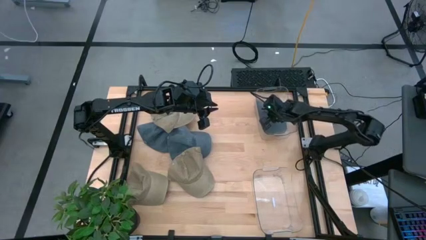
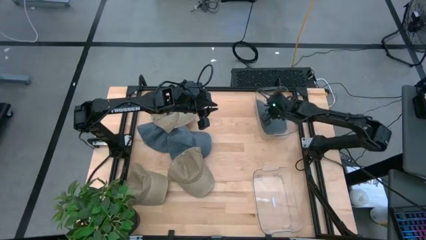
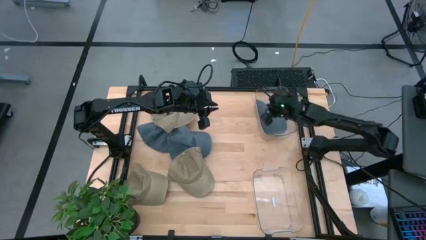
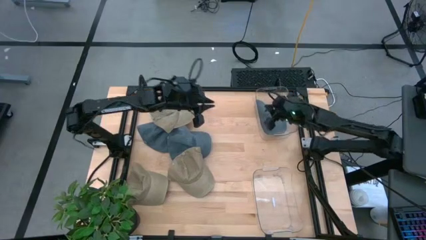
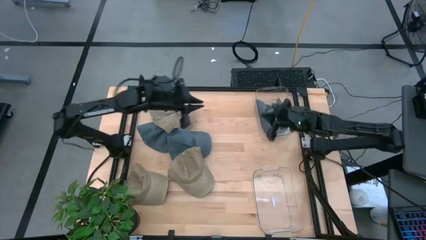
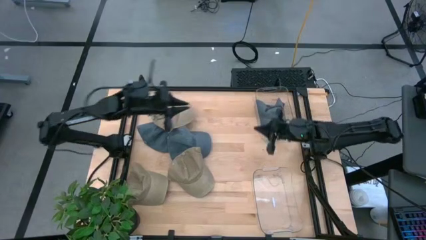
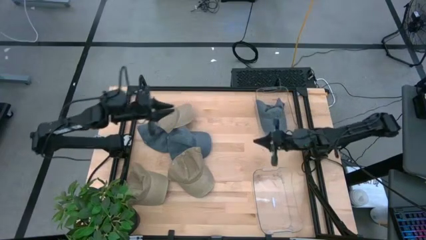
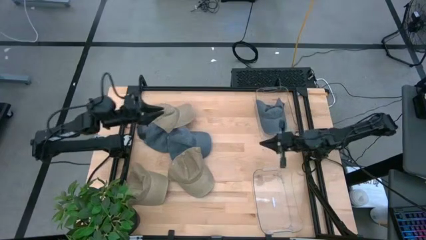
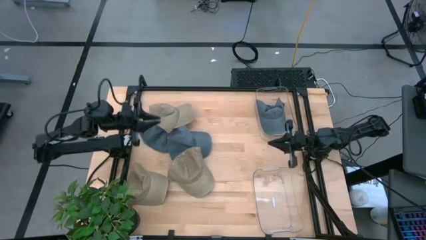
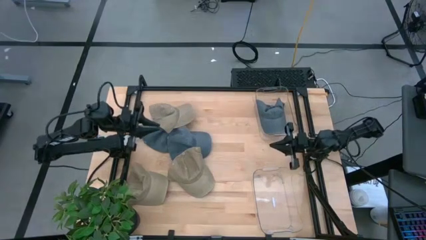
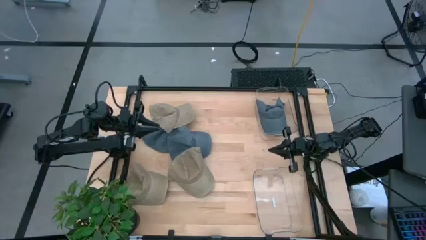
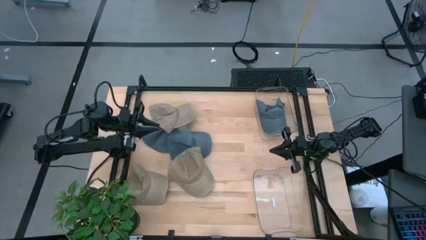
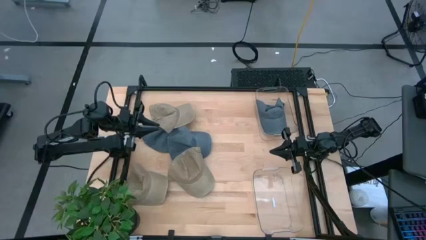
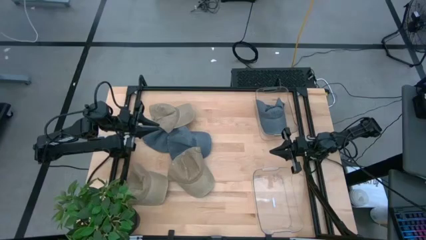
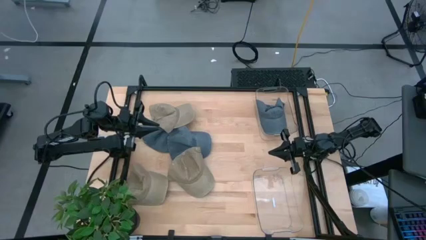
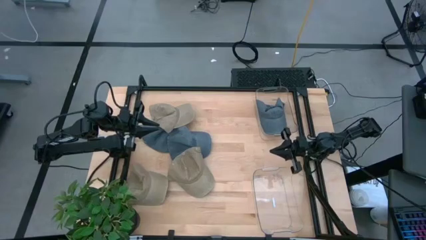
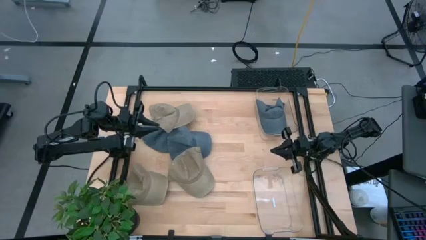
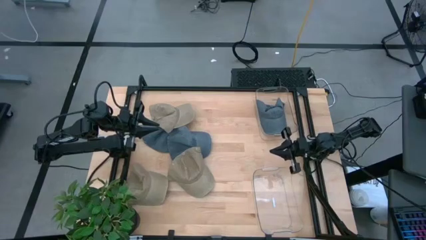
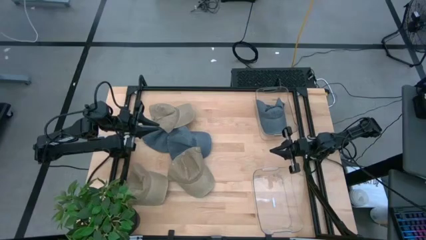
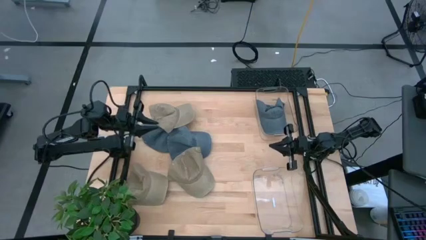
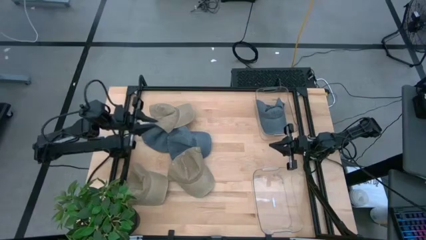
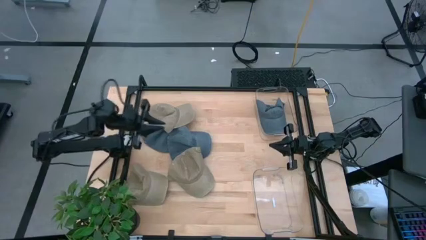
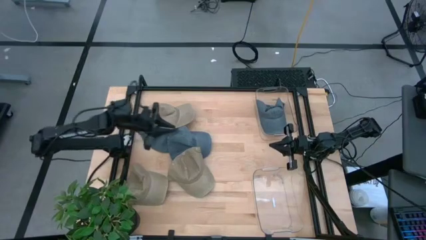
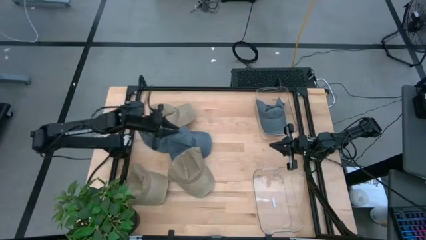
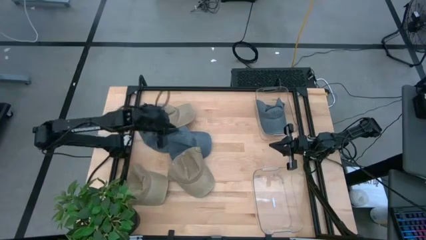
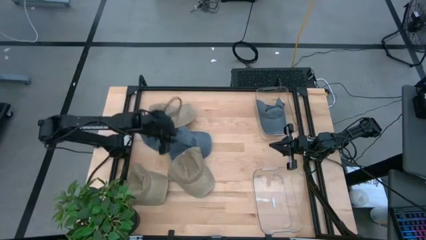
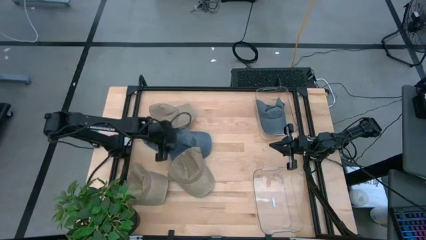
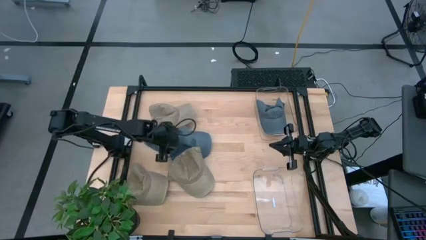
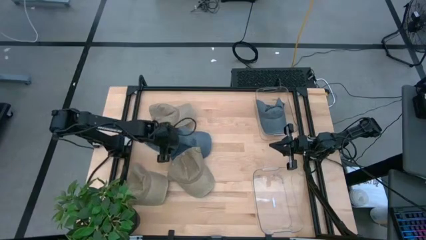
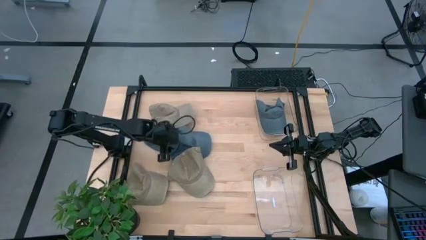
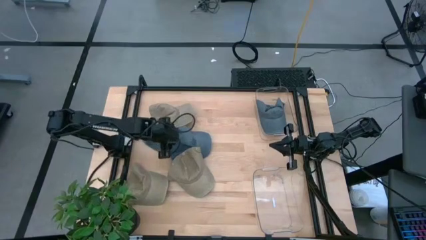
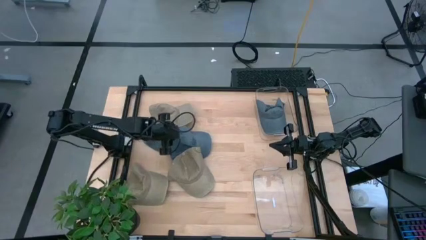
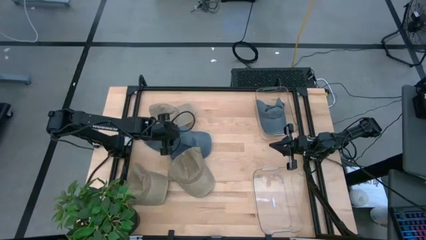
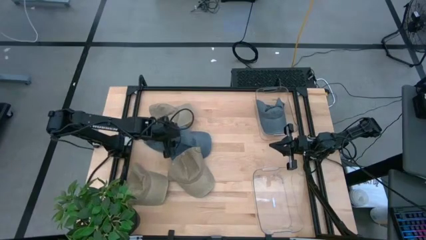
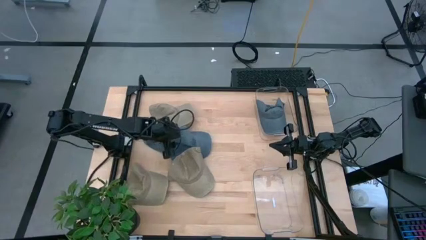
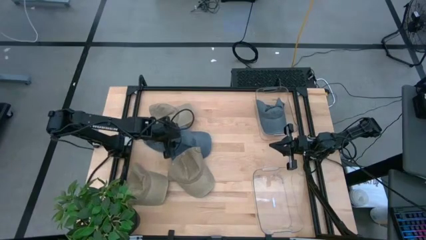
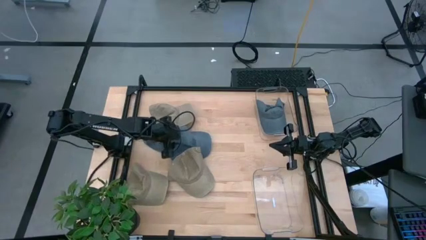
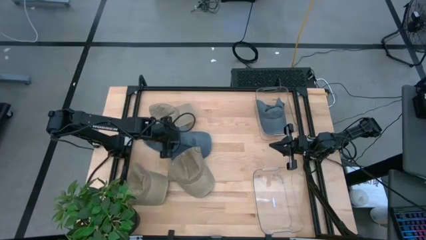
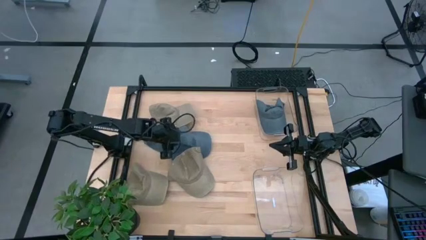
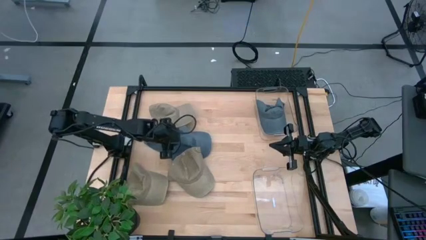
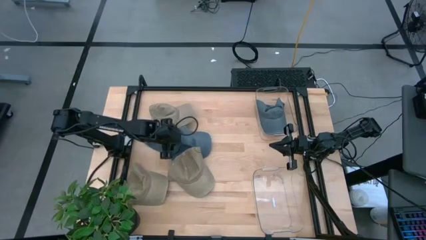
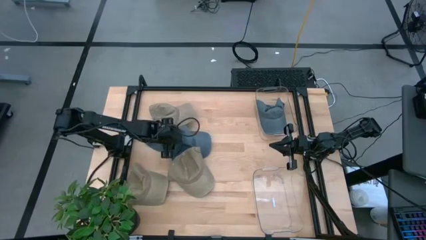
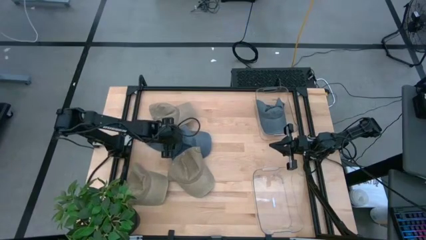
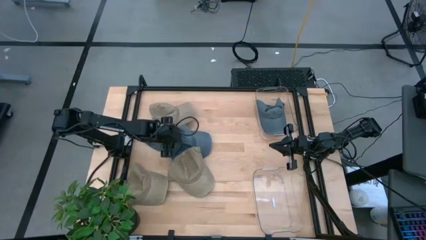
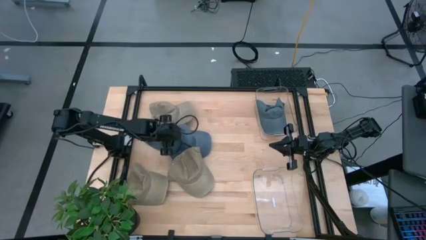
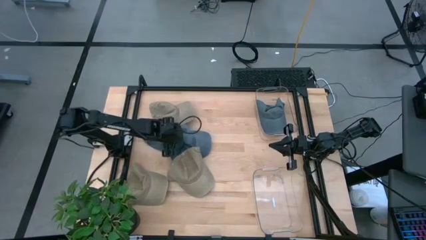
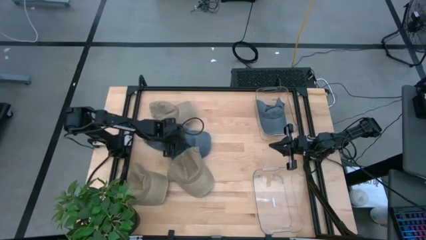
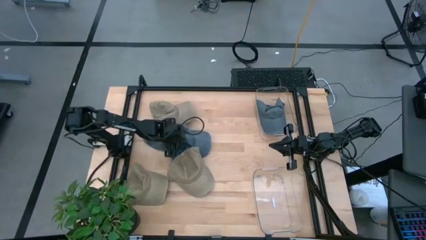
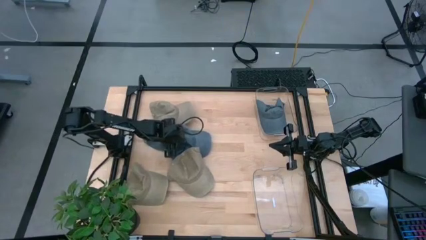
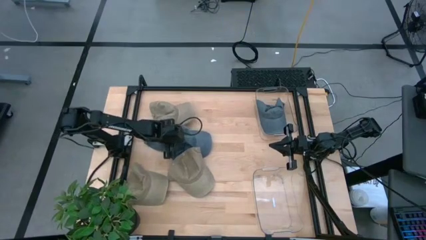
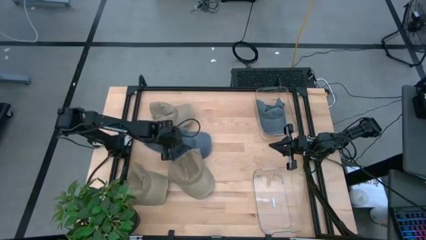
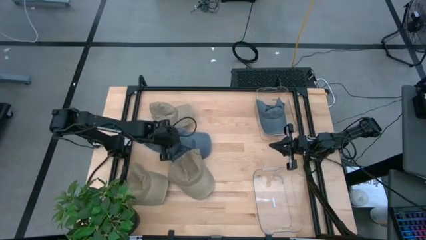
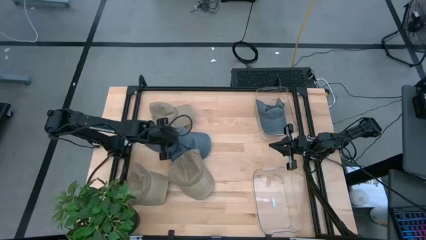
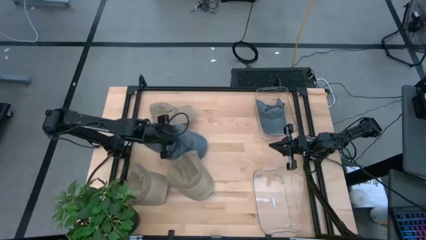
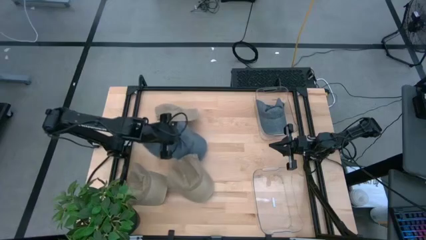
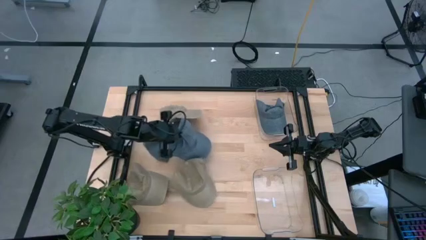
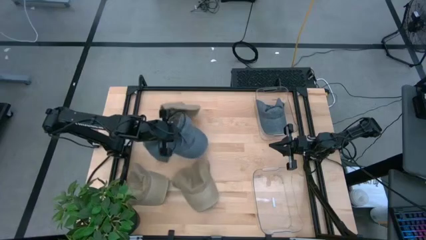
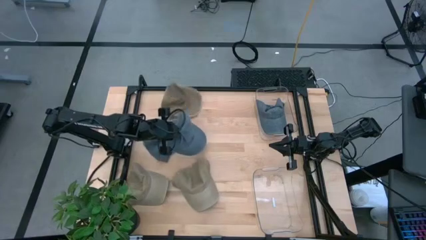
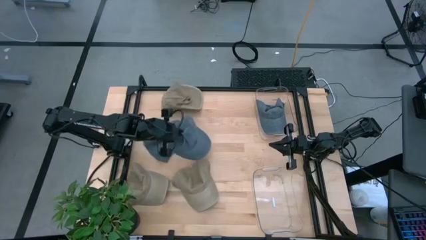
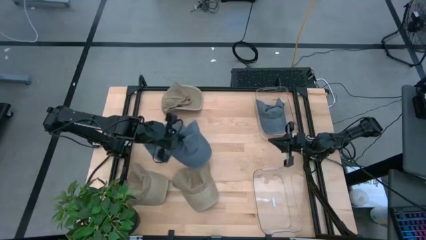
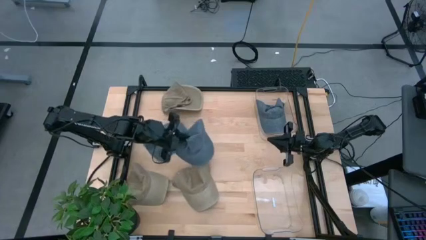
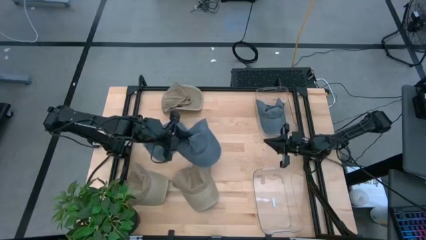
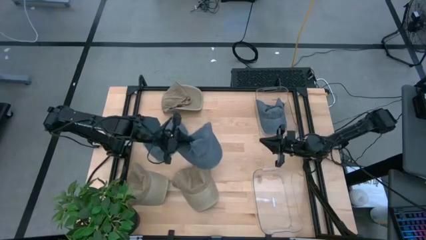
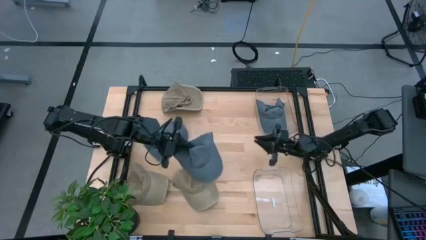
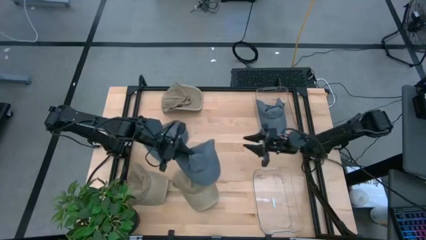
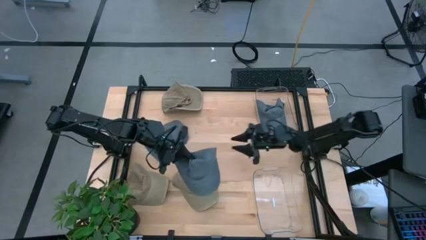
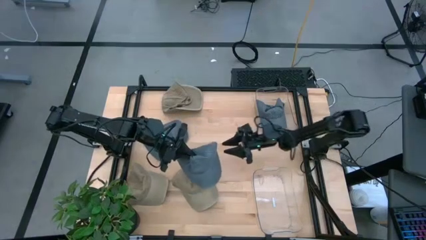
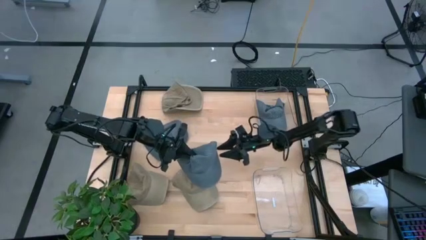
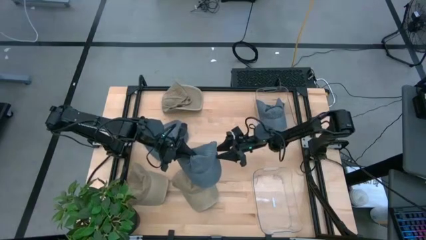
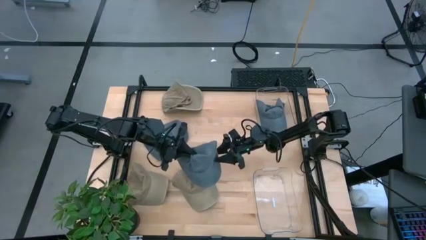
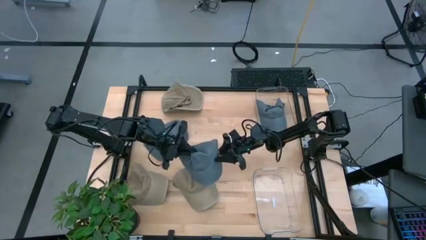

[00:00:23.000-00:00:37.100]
Task: Pick & Place hat
Put the right blue cap into the top transparent bin

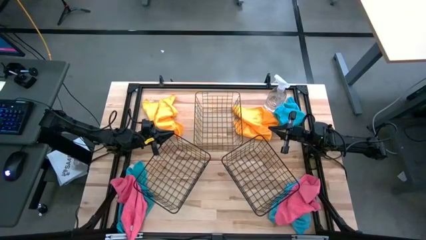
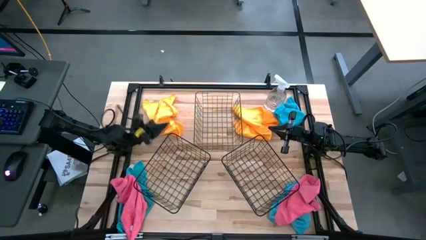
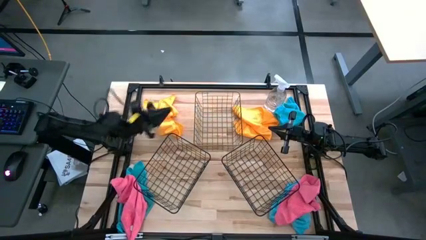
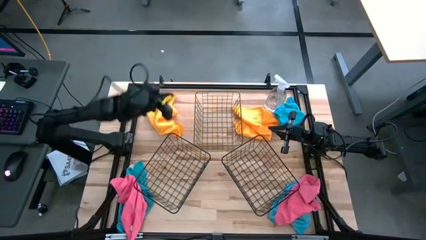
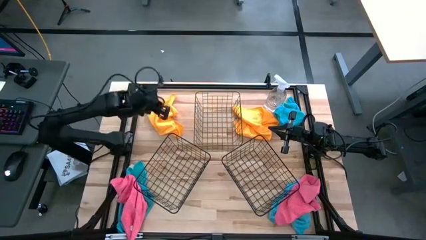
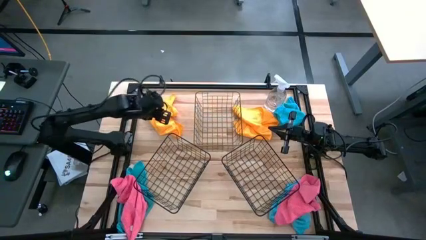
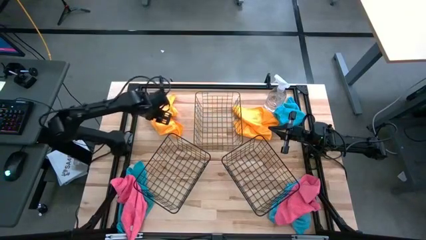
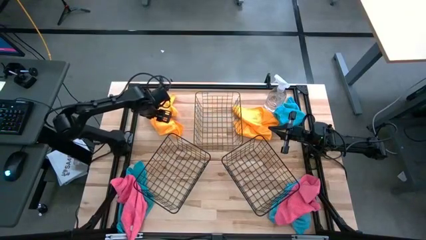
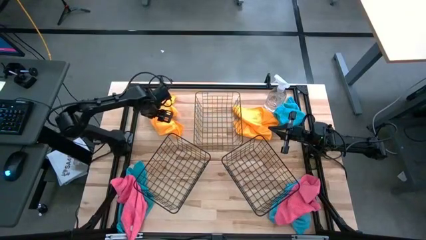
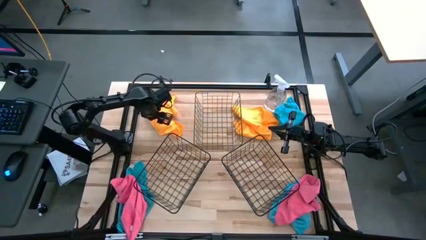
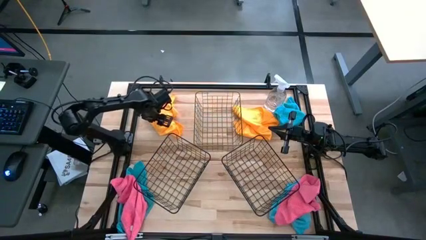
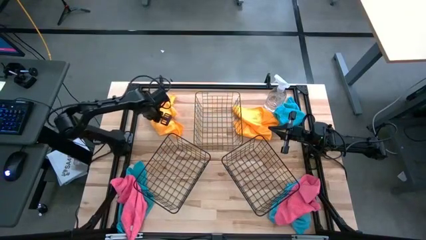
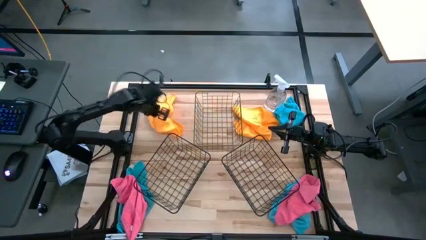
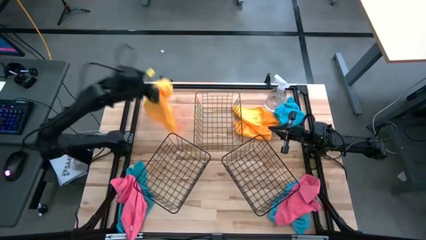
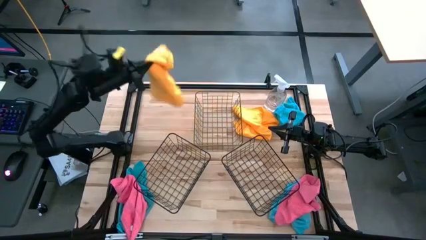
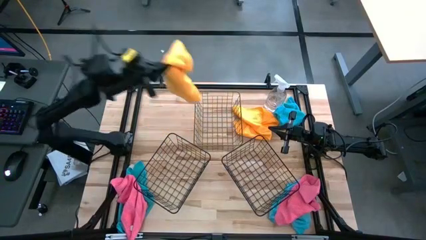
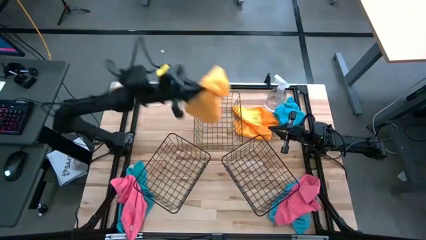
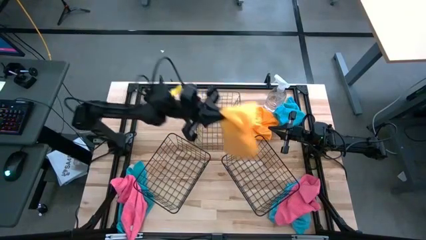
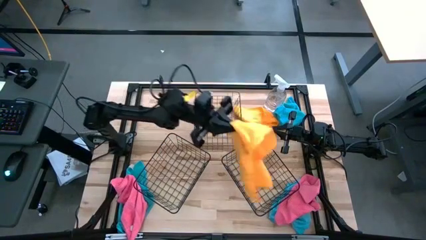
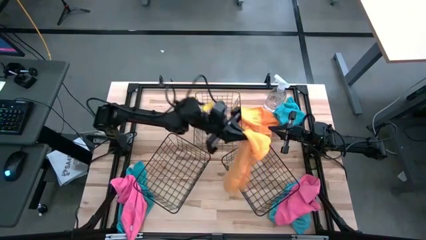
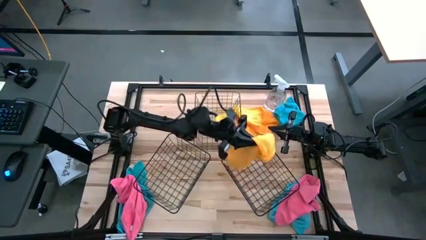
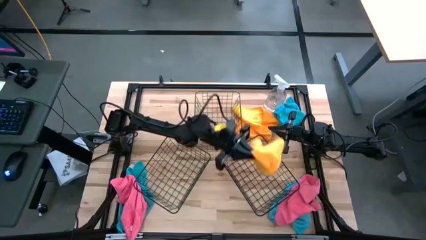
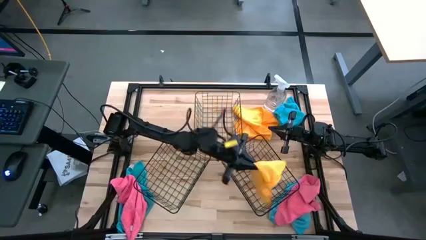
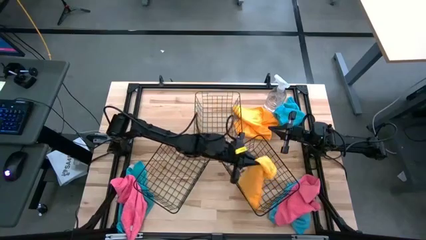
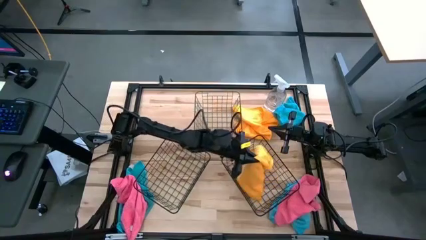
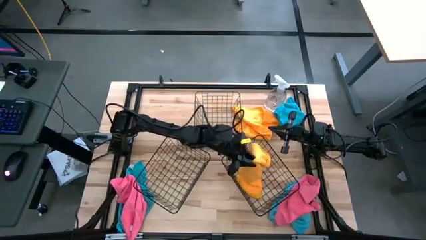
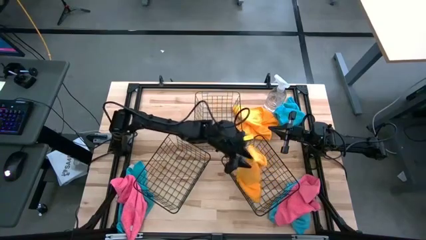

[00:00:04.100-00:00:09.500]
Task: Sort microfiber towel by color & place in baskets
Put the left orange microfiber cloth into the bottom right wire basket
